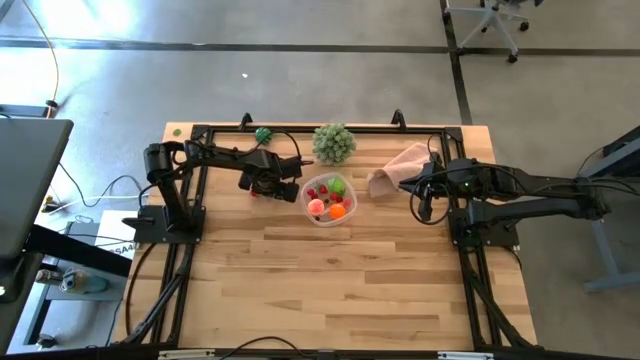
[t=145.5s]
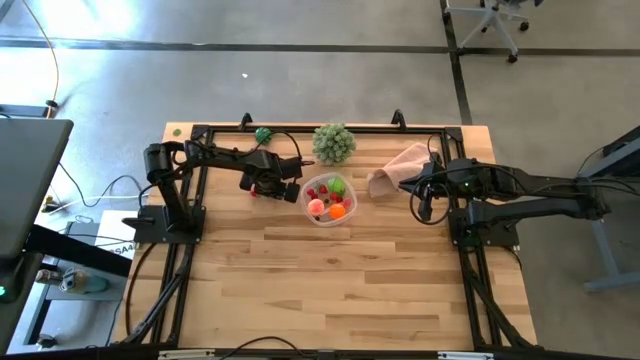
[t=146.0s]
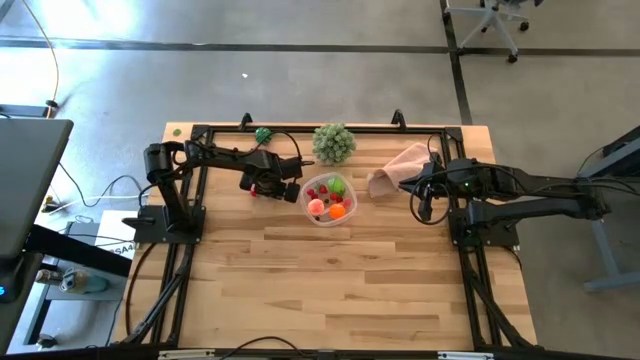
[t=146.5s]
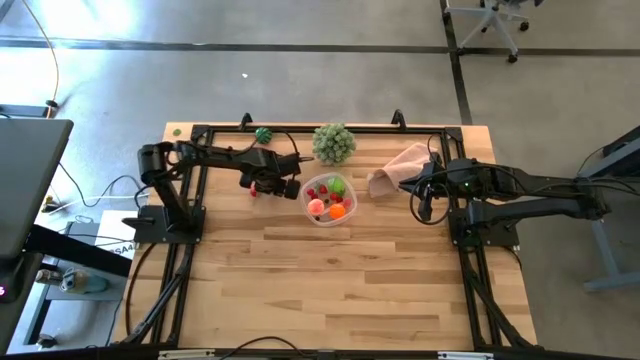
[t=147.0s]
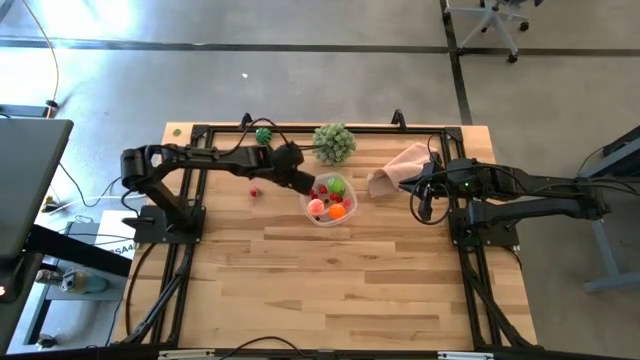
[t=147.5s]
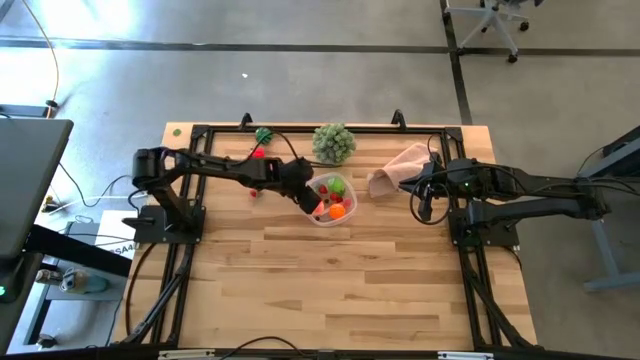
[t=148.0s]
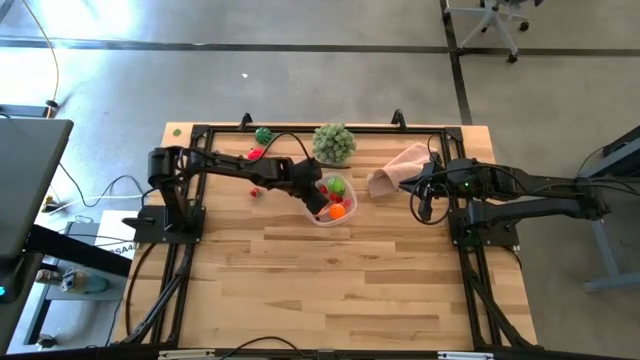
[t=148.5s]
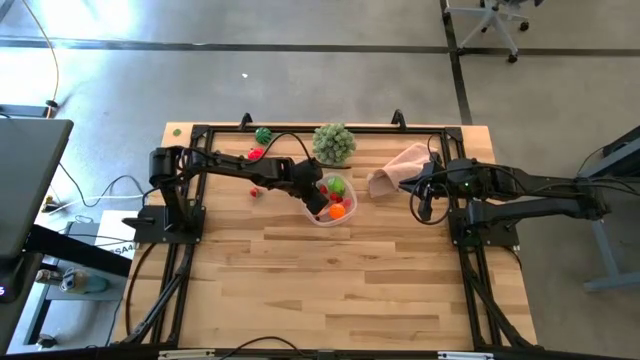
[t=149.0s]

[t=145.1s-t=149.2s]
Task: Pick and placing Produce into tupperware
Put the blackberry into the container

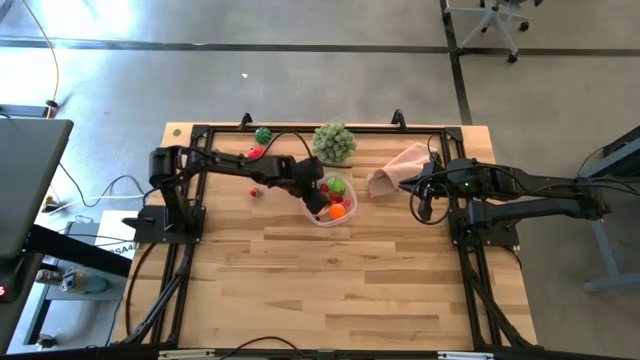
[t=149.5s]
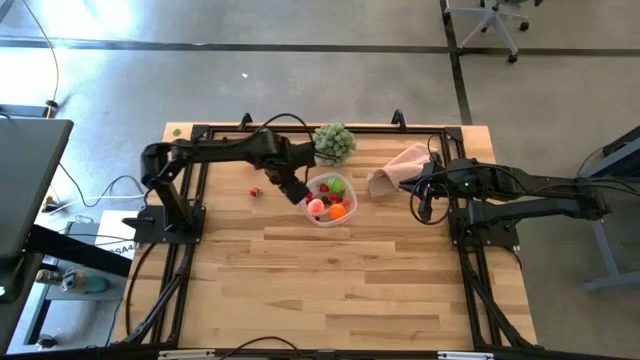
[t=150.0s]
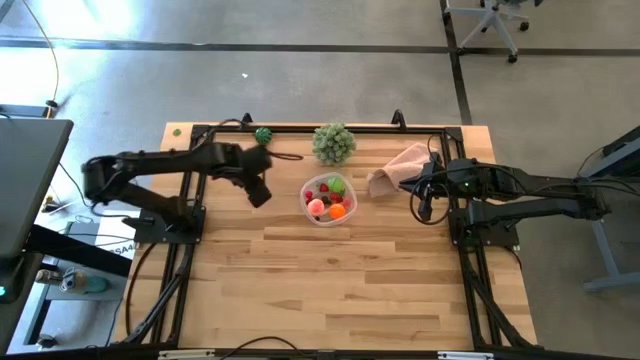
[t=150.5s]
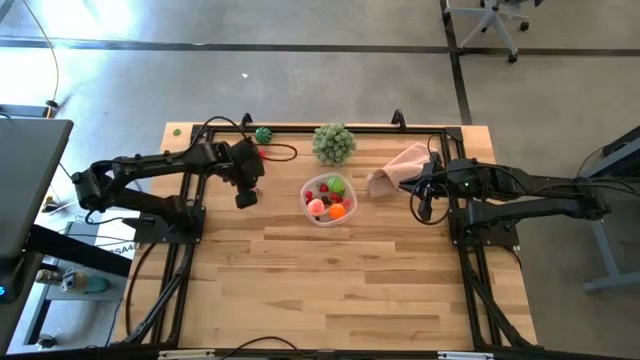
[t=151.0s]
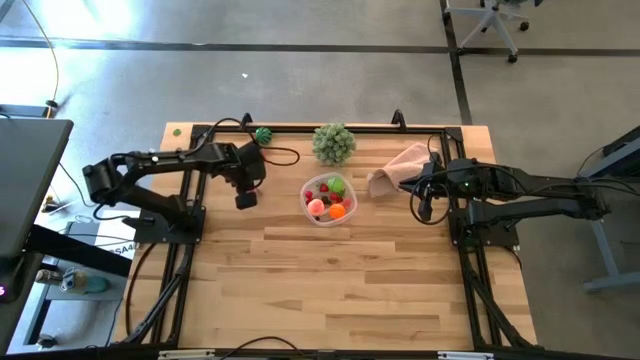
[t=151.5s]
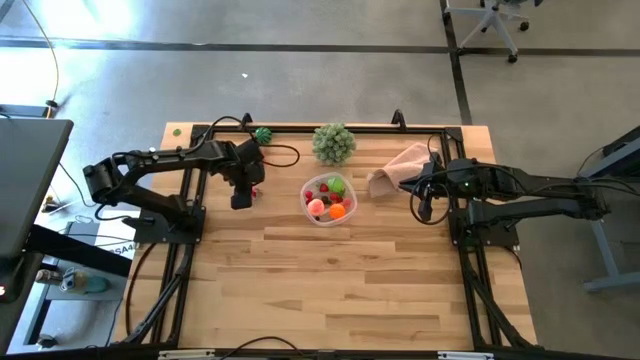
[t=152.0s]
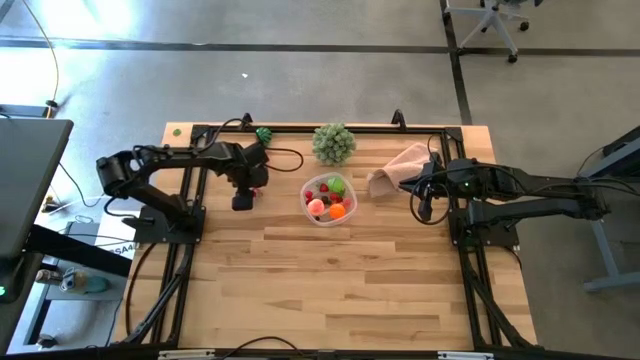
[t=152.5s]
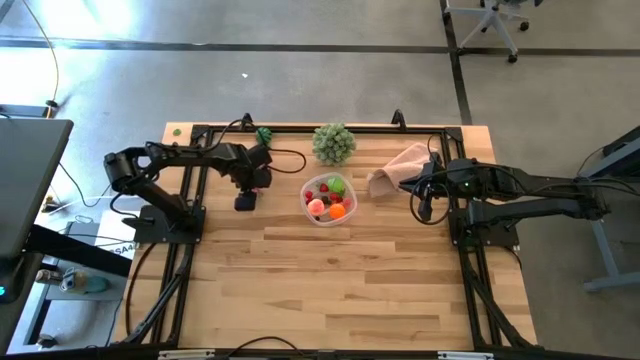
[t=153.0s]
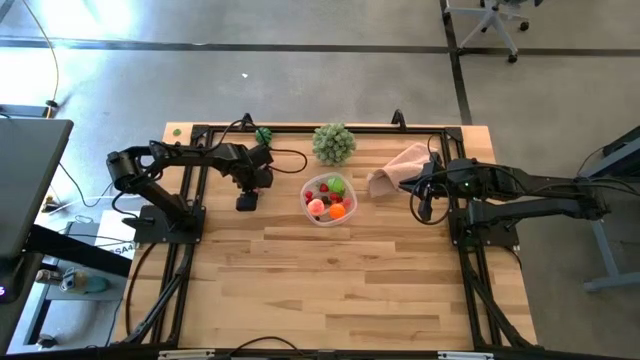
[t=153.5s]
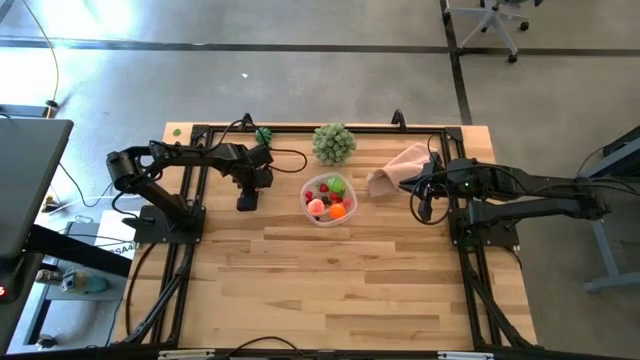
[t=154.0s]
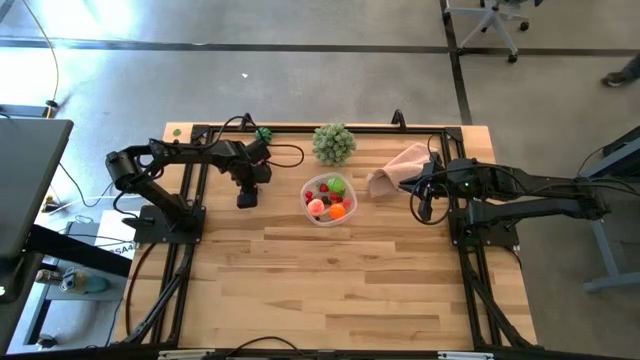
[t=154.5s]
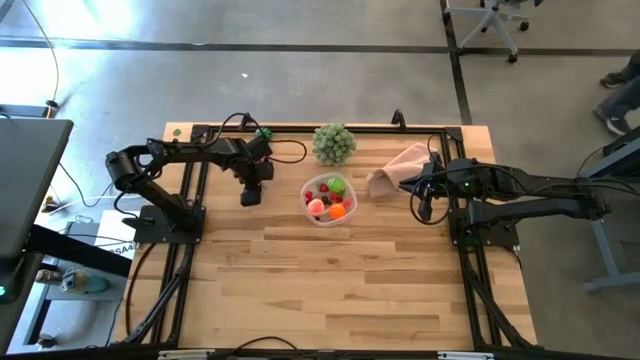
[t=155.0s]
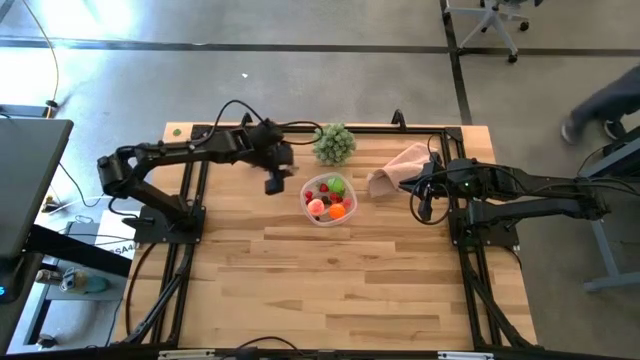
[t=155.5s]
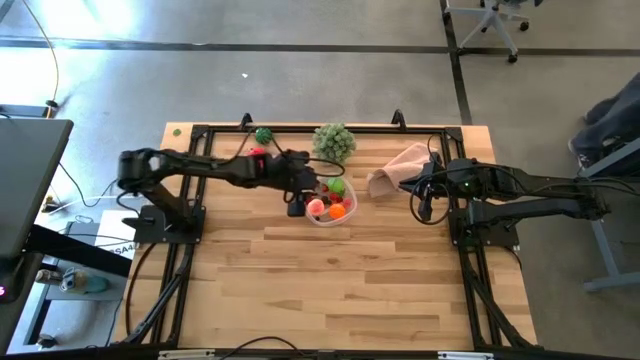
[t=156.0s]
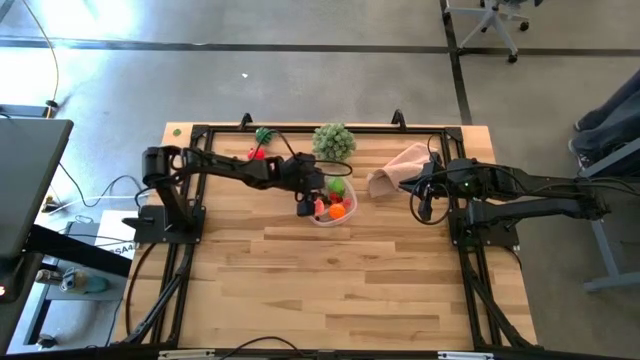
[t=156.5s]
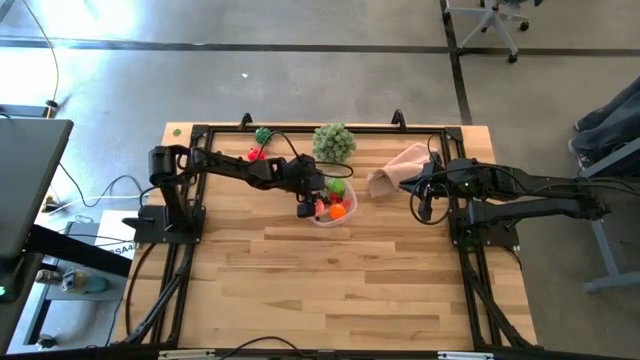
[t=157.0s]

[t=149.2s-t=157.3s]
Put the strawberry into the container

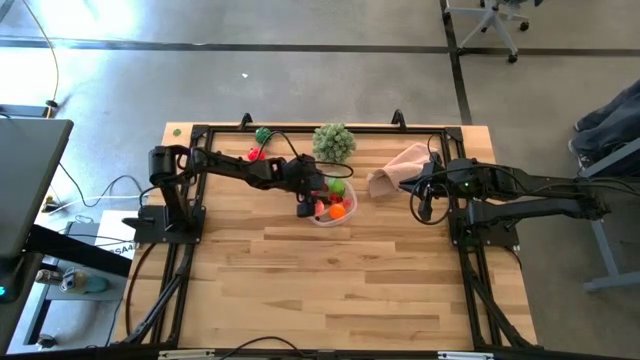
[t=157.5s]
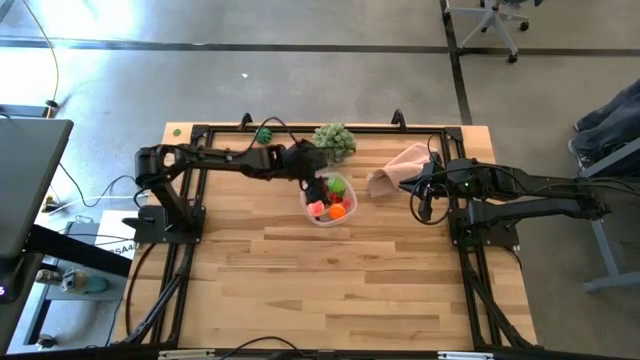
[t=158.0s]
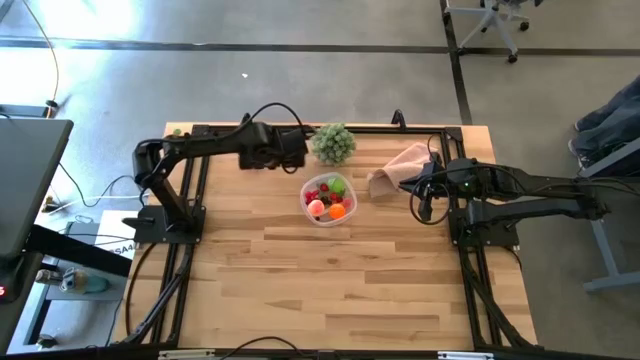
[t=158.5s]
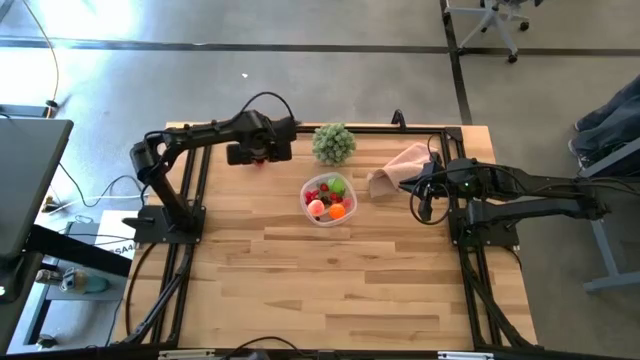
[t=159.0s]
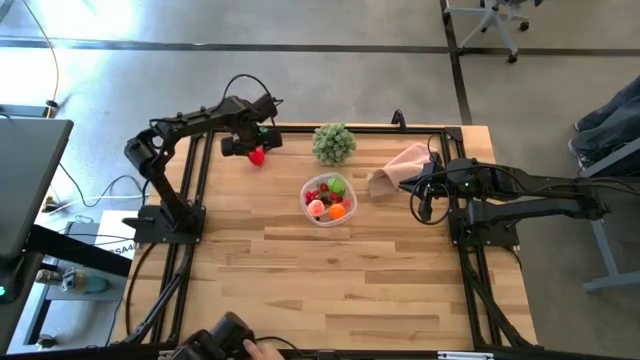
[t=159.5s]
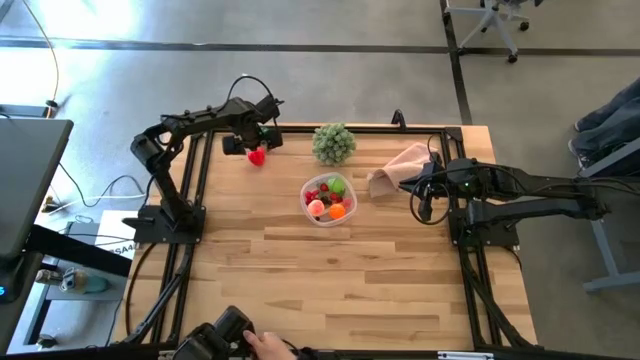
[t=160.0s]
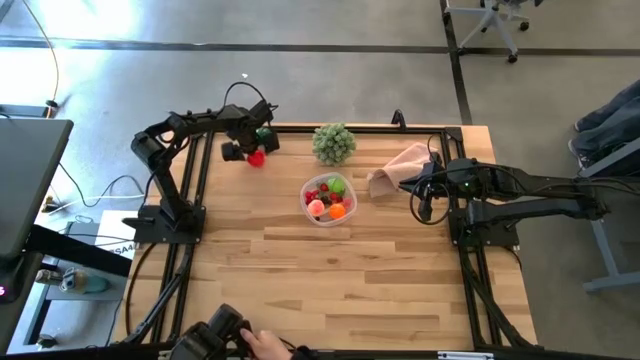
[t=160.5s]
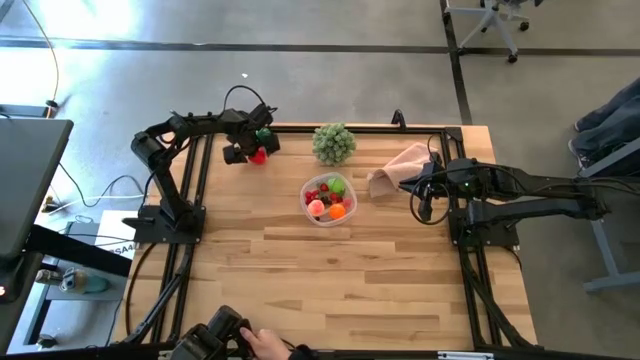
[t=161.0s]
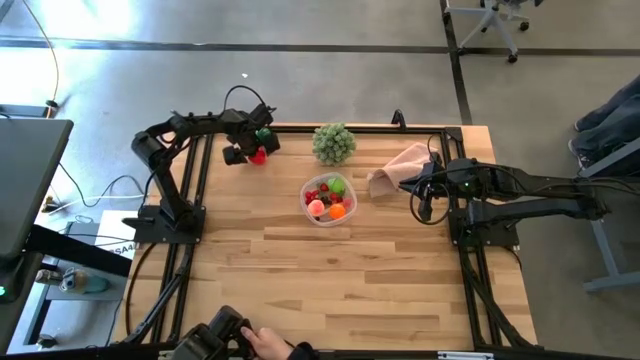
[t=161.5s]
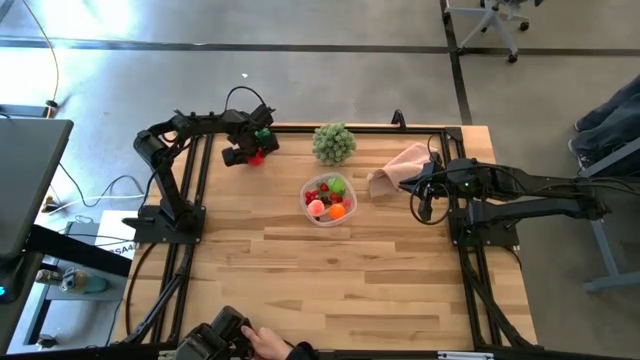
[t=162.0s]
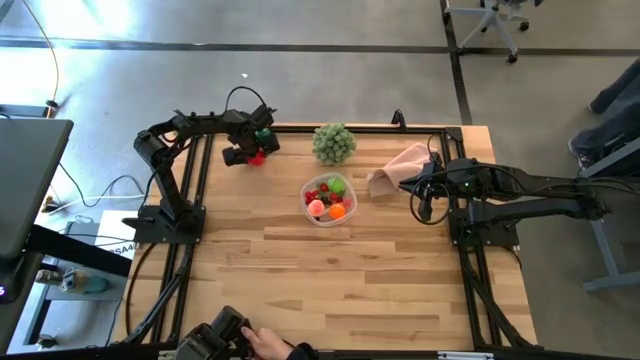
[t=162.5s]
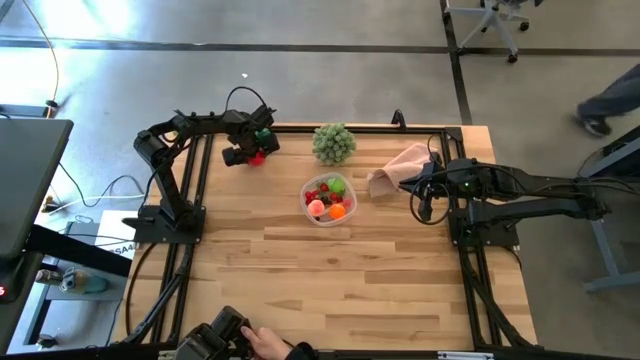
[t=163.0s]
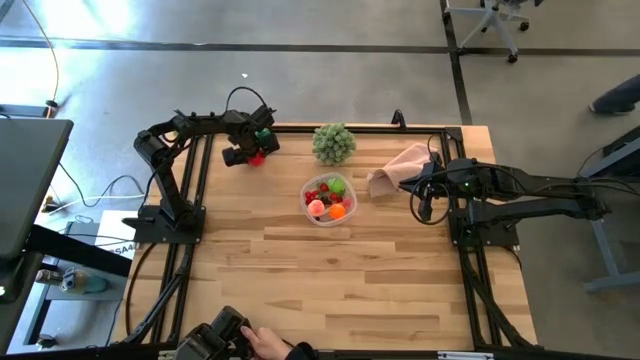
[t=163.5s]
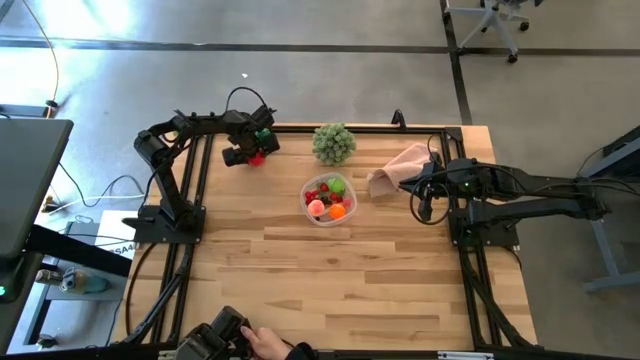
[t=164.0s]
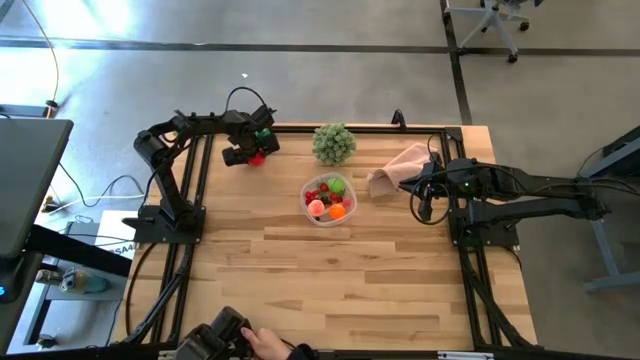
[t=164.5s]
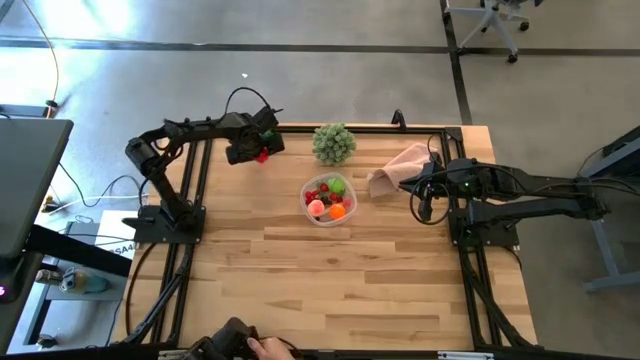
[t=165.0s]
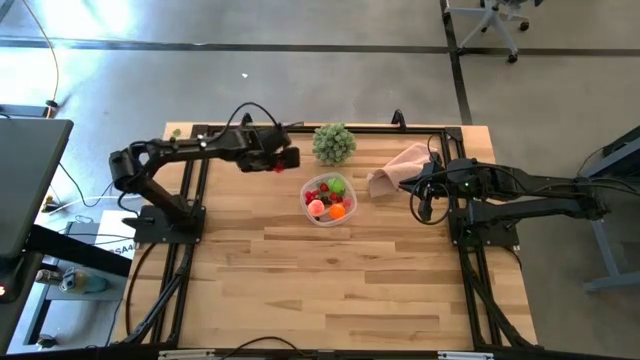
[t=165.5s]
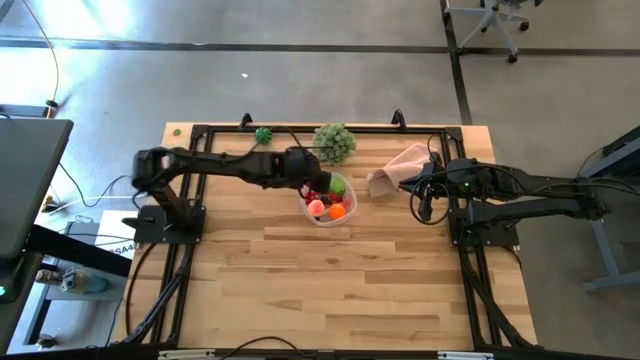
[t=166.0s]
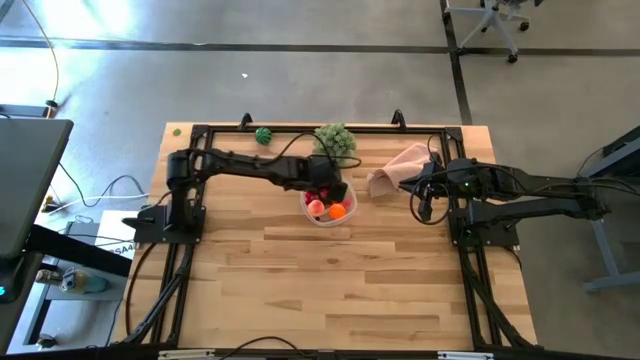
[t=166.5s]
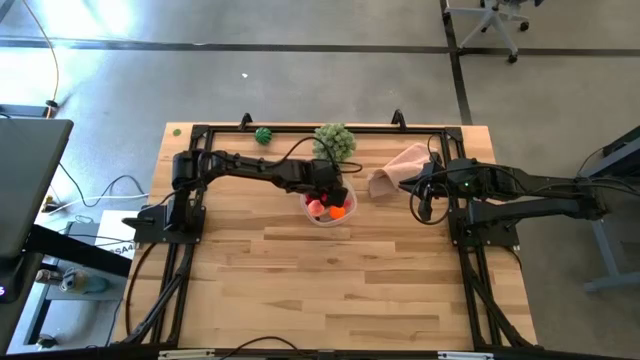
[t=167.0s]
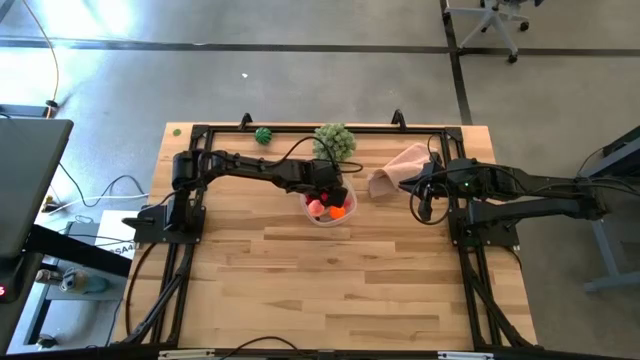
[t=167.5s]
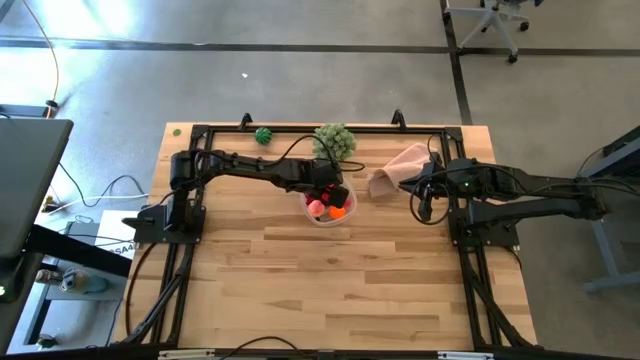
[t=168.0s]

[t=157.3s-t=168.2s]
Put the apple into the container
